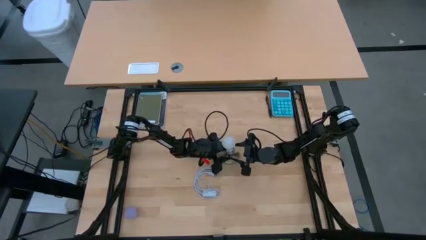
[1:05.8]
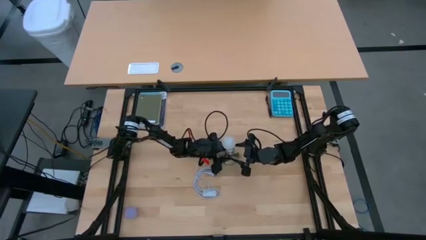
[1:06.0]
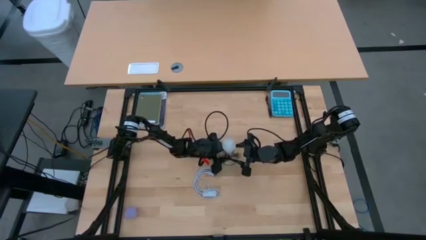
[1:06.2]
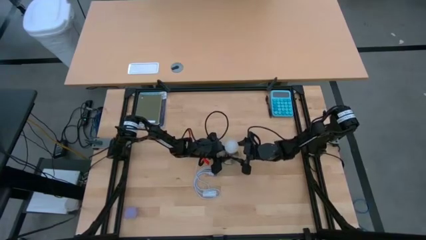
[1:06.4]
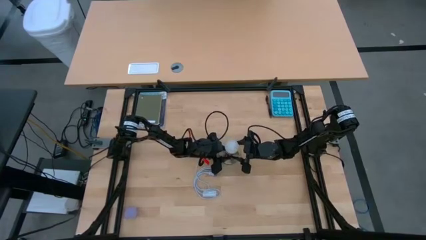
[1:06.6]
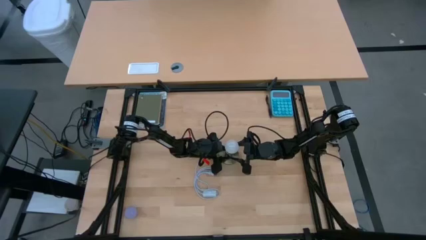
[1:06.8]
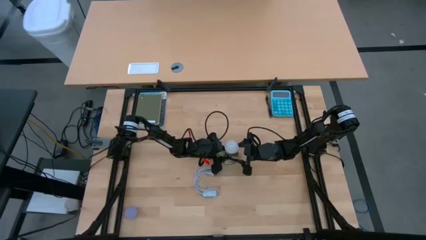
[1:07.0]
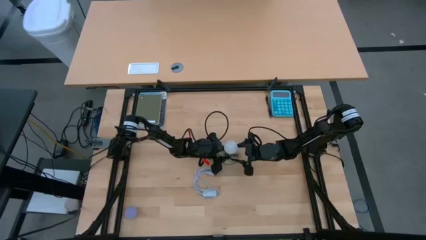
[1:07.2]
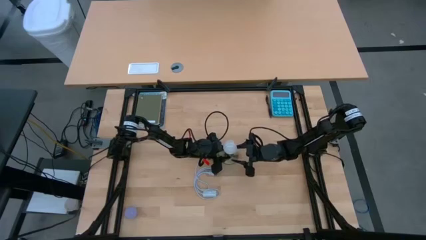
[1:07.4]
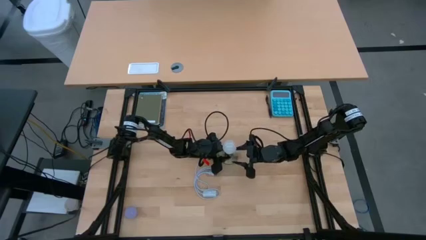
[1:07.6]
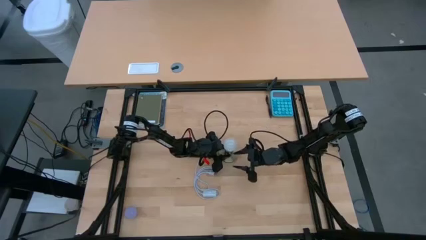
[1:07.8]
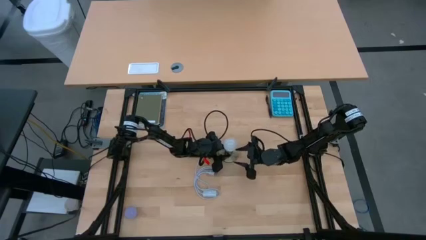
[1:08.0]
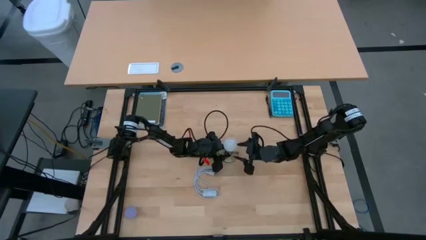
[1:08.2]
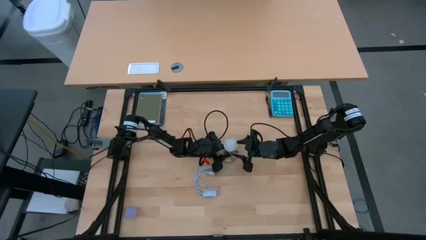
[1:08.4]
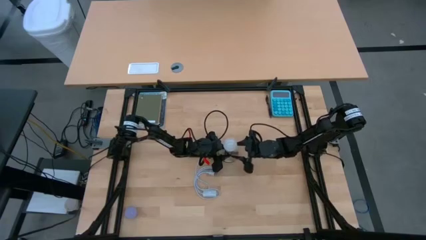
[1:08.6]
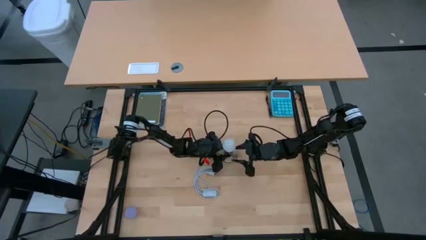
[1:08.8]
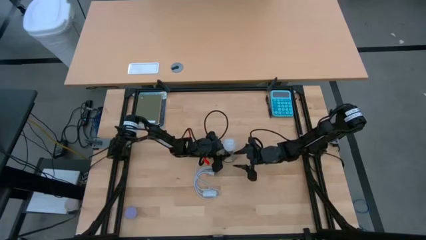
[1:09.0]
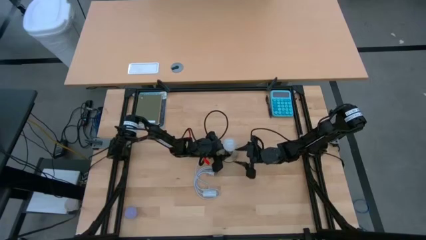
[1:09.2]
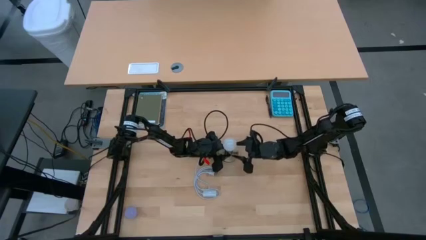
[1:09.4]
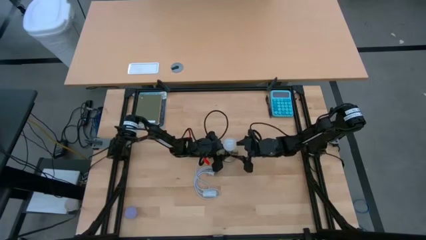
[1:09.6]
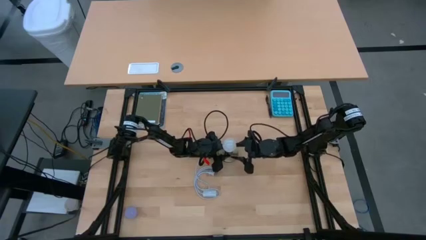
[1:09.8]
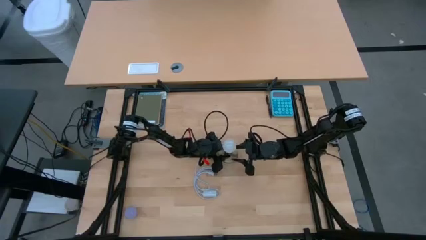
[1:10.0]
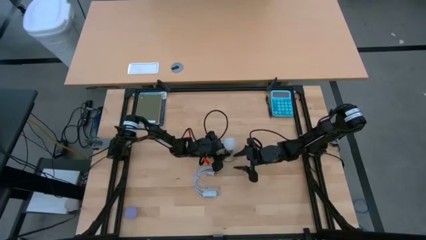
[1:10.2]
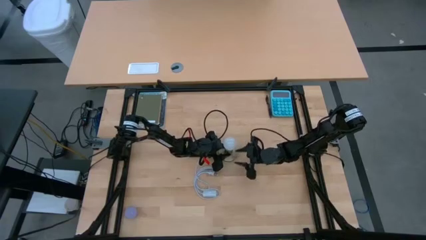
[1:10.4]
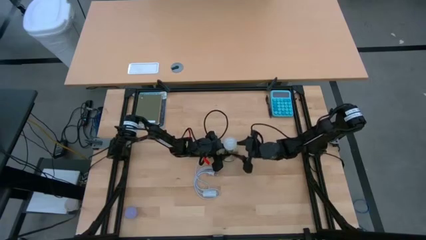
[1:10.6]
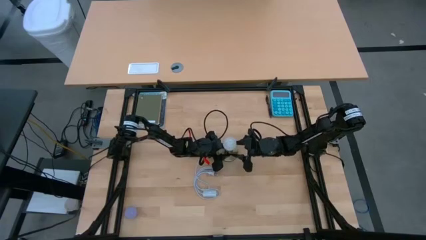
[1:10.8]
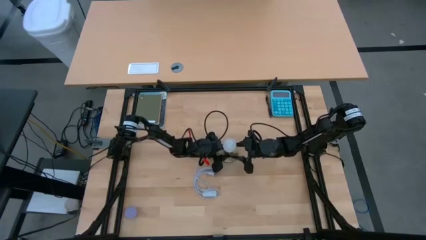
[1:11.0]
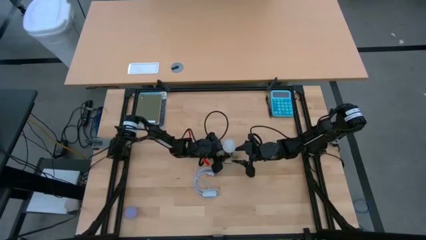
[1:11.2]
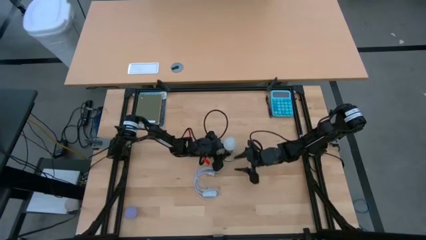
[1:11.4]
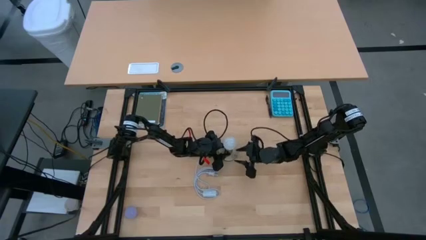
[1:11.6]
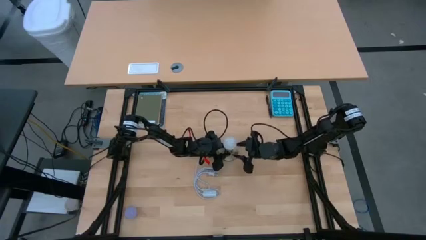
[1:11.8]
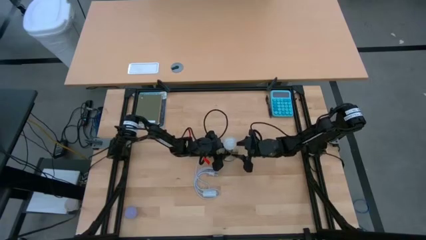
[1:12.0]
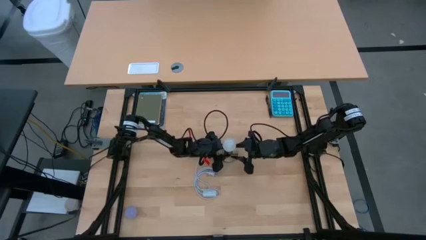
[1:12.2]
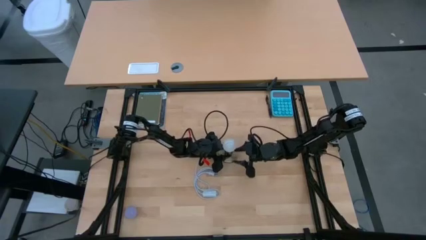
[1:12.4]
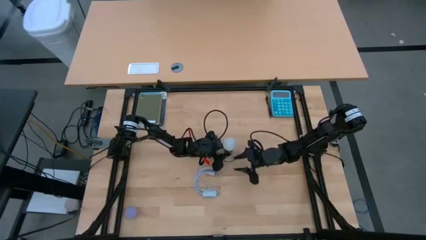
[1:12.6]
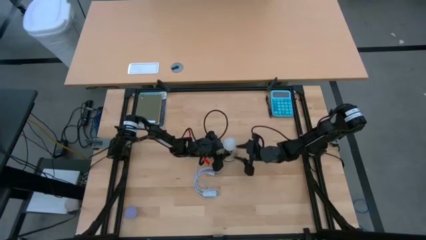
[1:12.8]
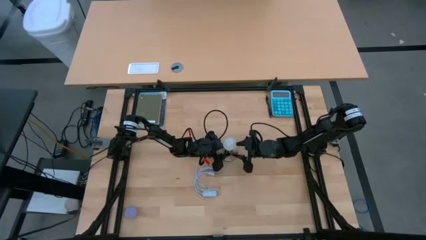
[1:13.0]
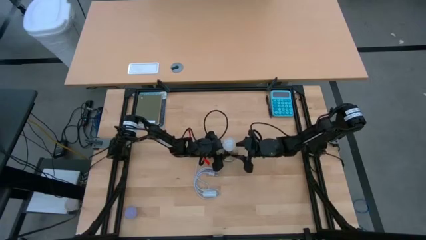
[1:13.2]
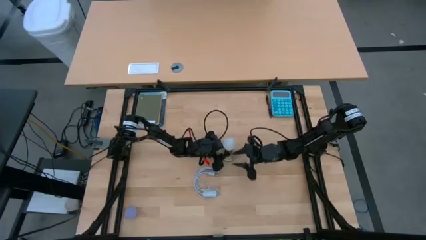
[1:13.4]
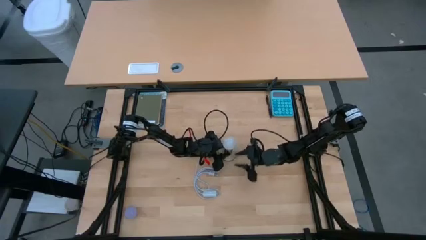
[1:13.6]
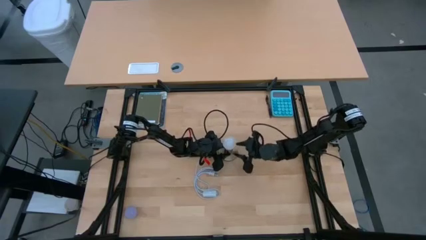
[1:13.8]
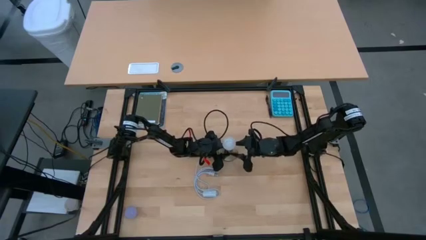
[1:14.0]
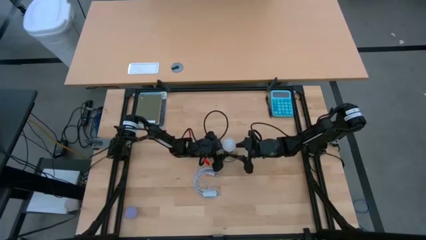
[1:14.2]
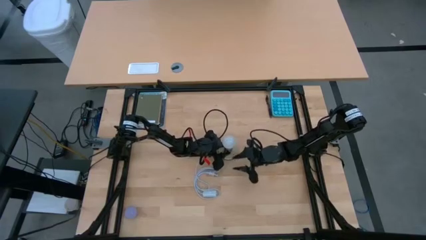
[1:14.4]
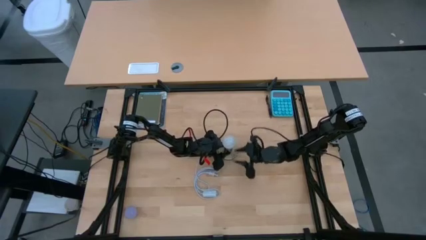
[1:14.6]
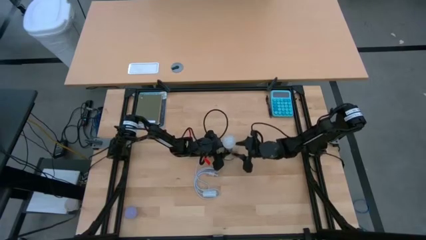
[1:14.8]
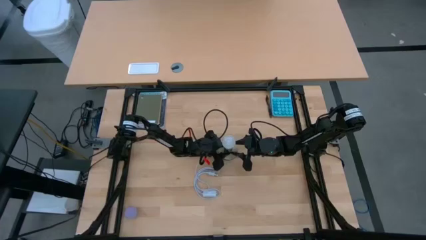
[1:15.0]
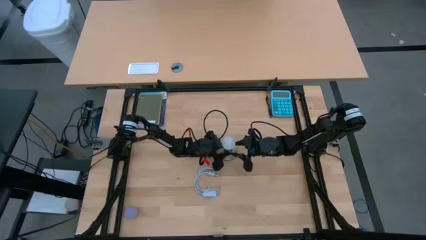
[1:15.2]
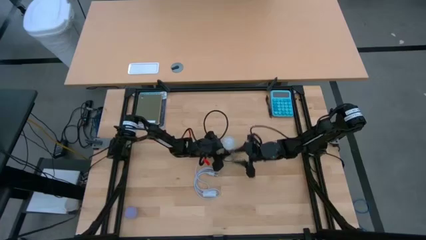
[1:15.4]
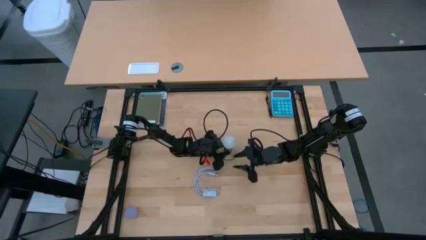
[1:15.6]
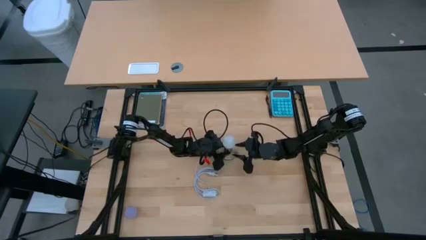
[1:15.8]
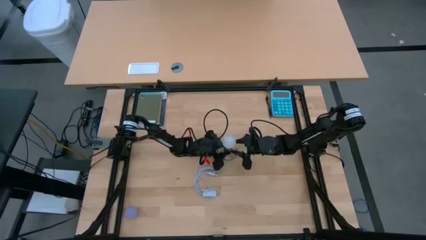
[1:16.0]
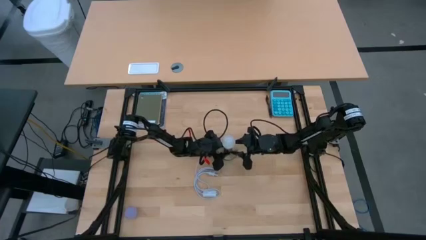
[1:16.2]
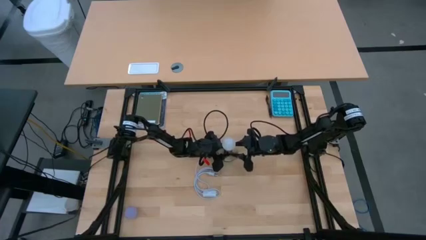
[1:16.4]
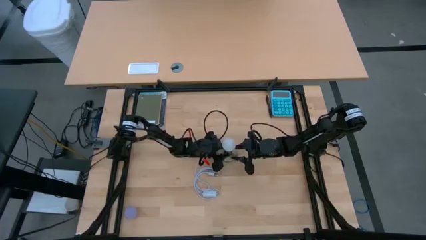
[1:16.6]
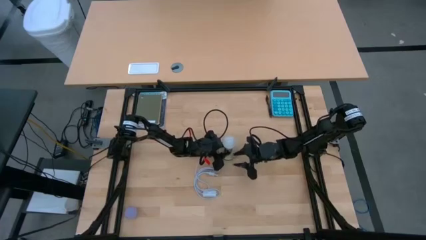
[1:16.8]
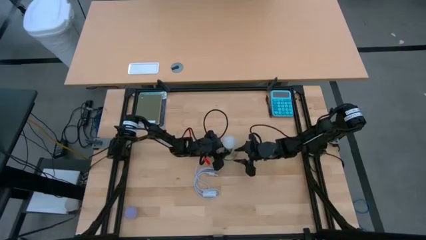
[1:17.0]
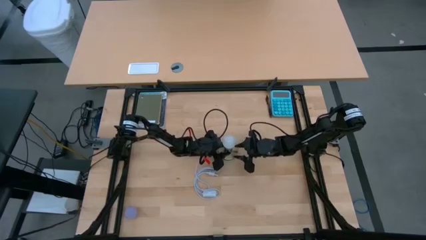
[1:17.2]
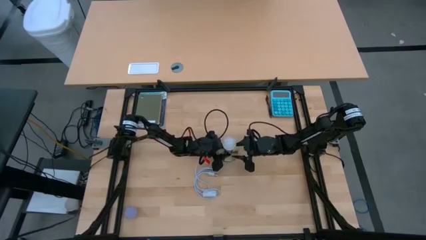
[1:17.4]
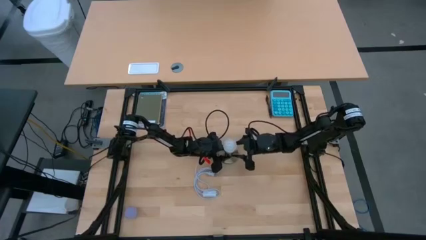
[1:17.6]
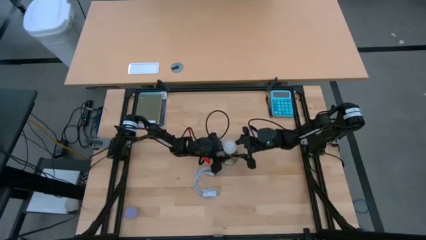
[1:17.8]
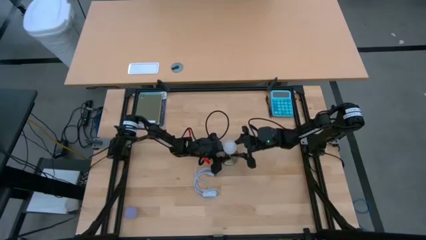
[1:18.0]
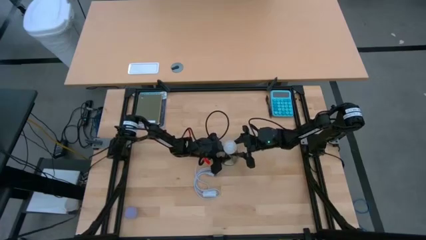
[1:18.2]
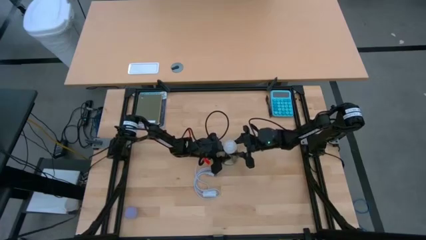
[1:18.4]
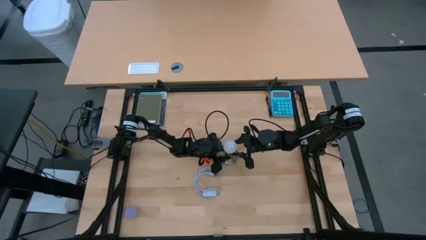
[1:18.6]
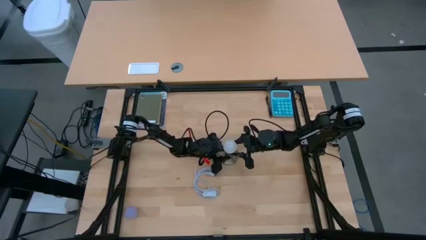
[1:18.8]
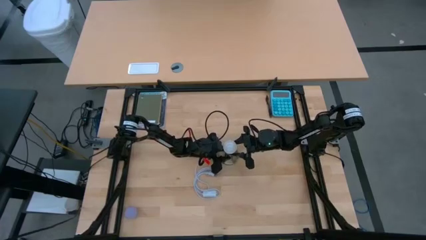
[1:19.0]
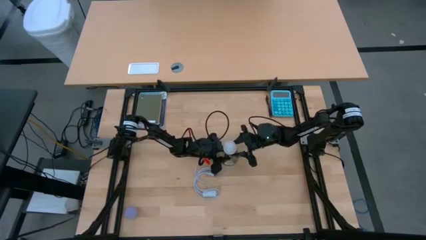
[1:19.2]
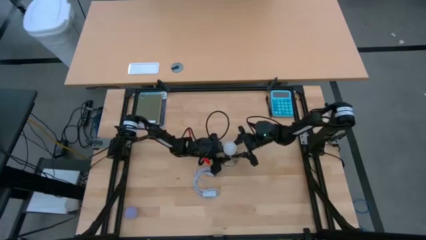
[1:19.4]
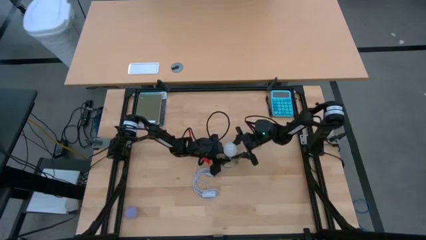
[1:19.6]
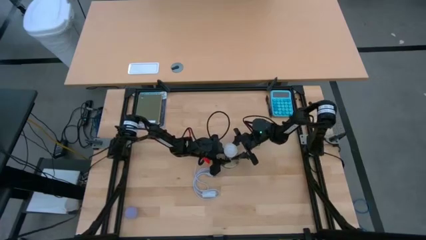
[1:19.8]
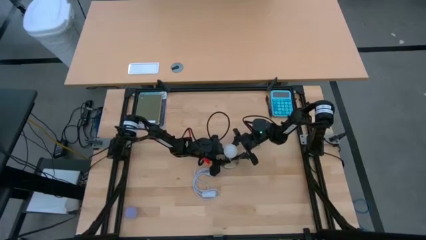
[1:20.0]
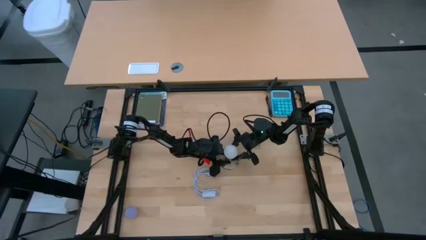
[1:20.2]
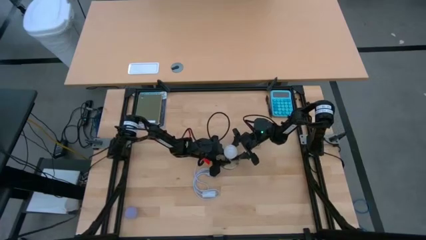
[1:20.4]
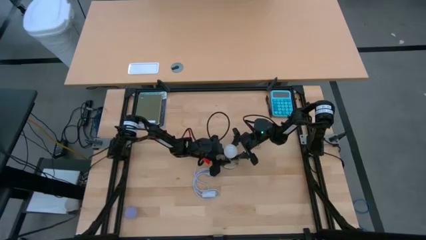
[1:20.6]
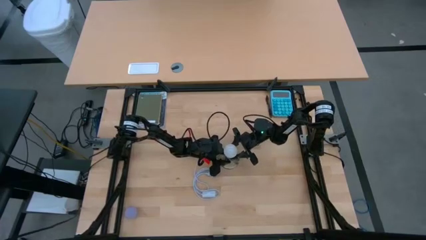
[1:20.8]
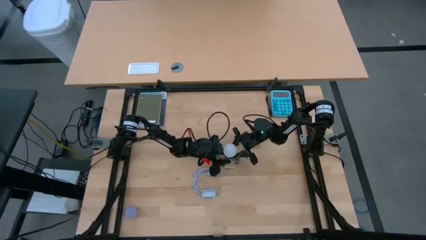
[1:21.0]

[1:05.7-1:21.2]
Task: Screw lightbulb
Insert the white lightbulb into the silver lamp

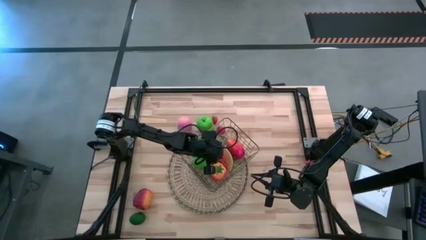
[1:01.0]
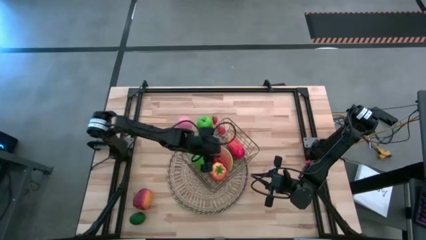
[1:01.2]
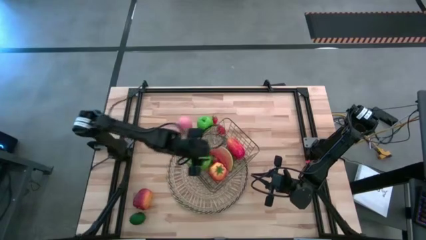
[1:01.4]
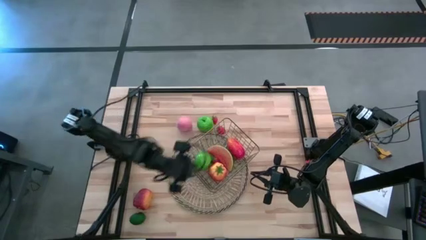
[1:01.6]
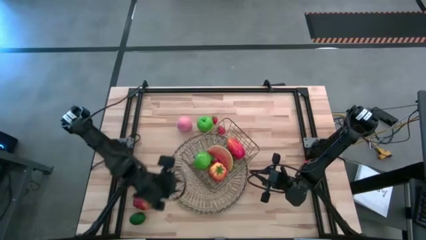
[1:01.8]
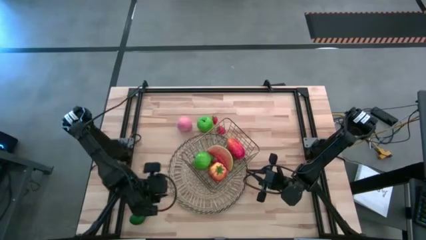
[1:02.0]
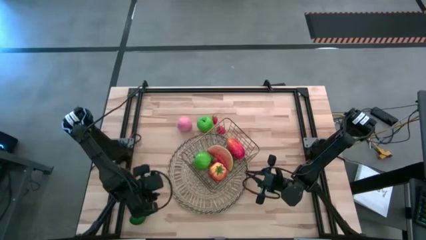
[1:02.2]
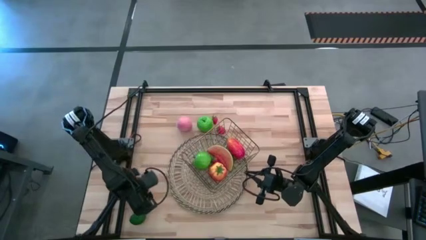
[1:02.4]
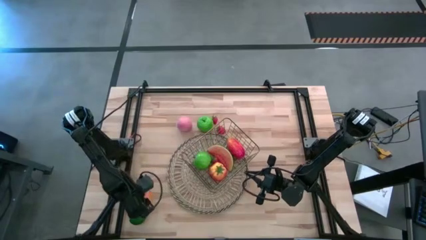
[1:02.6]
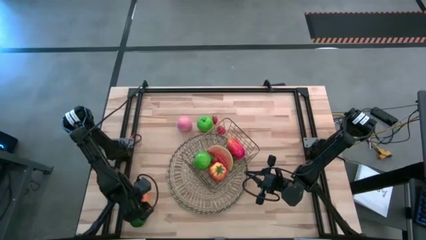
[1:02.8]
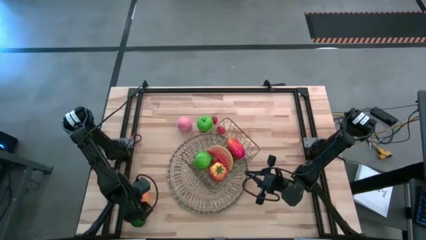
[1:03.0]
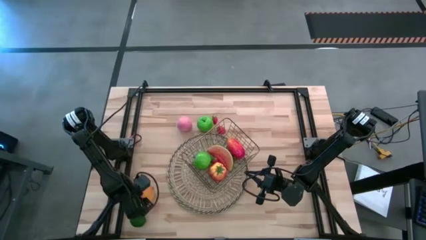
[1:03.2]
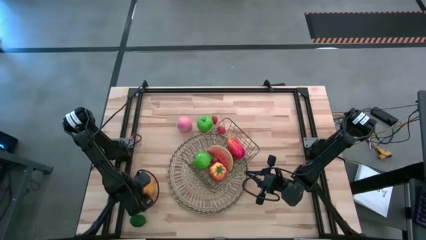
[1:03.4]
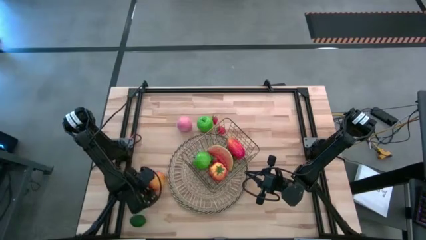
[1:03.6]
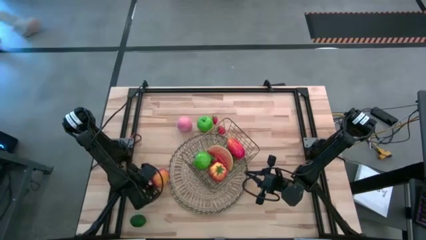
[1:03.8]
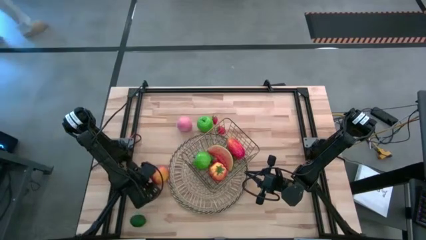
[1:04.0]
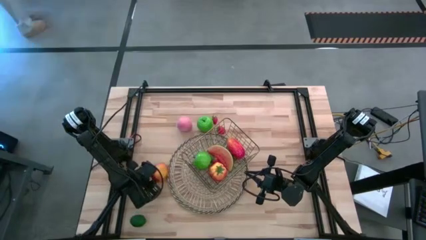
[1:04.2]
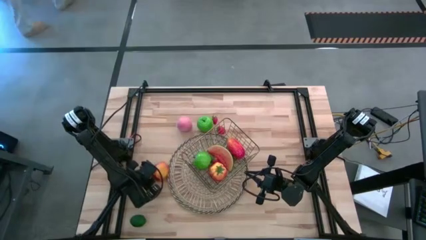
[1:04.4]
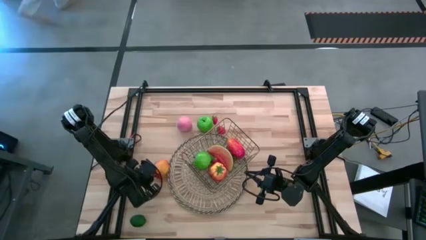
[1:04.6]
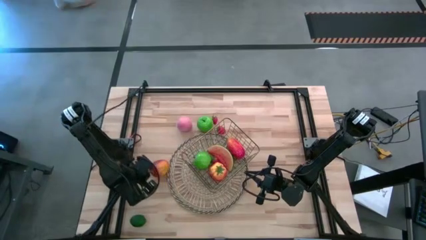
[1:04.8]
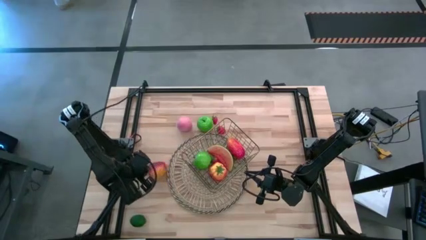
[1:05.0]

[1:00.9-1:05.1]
Task: Build produce basket
Put the red apple into the gold wire basket
